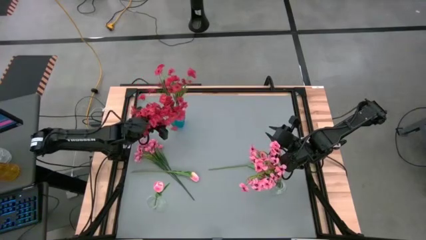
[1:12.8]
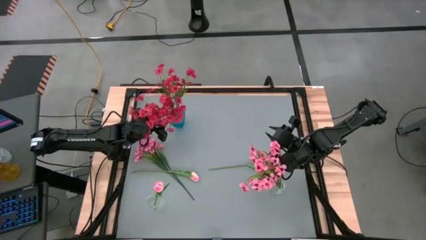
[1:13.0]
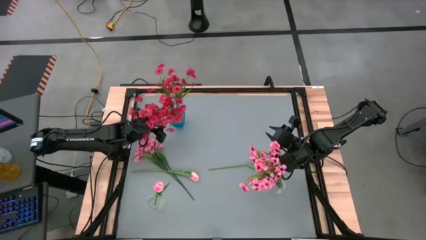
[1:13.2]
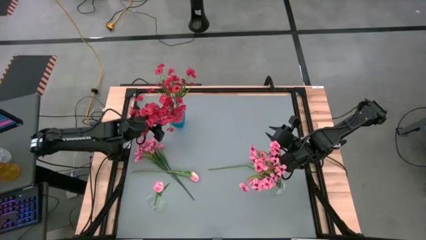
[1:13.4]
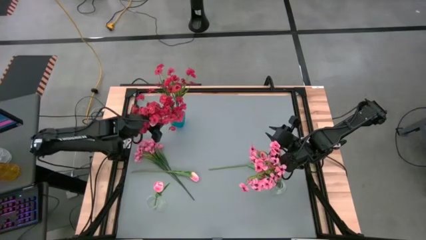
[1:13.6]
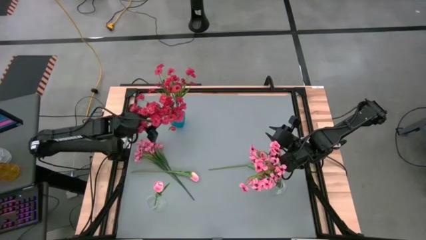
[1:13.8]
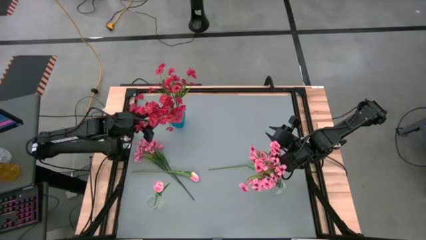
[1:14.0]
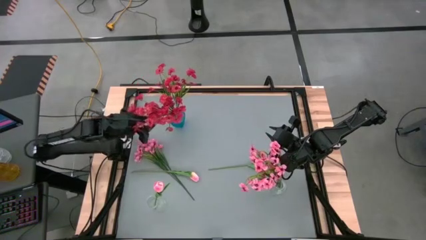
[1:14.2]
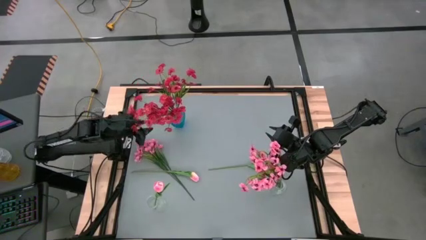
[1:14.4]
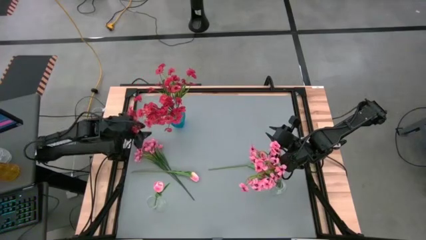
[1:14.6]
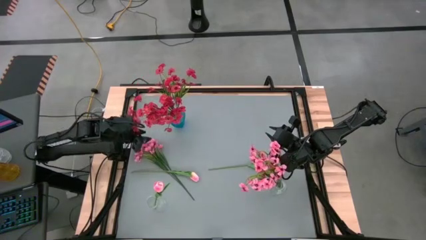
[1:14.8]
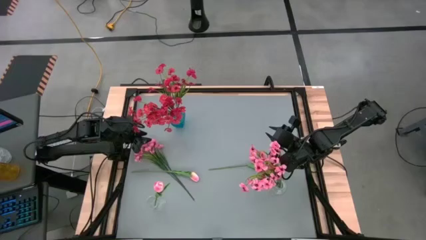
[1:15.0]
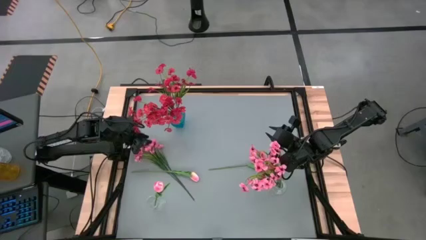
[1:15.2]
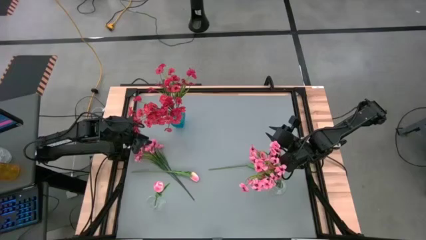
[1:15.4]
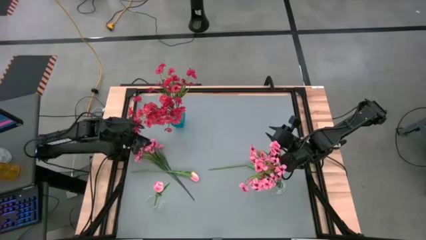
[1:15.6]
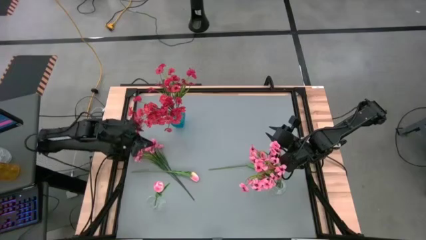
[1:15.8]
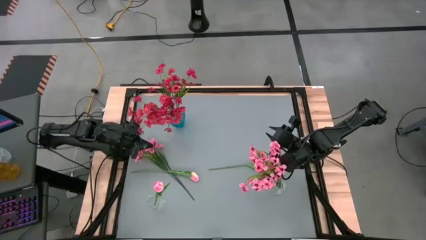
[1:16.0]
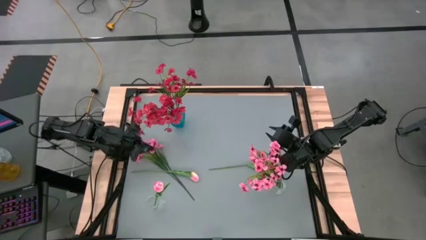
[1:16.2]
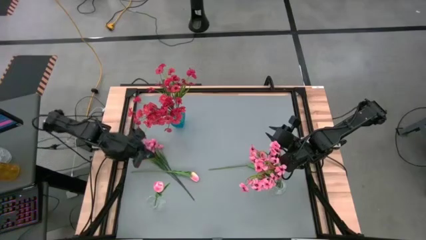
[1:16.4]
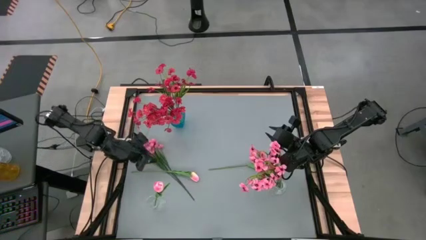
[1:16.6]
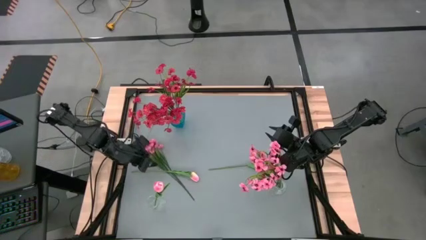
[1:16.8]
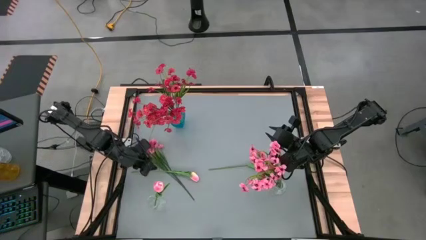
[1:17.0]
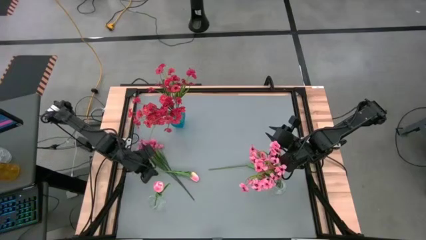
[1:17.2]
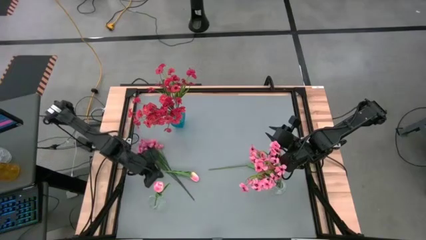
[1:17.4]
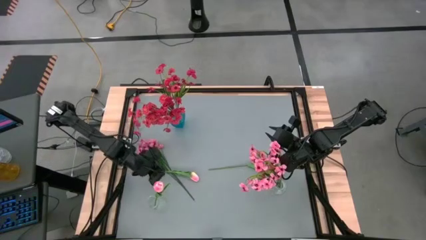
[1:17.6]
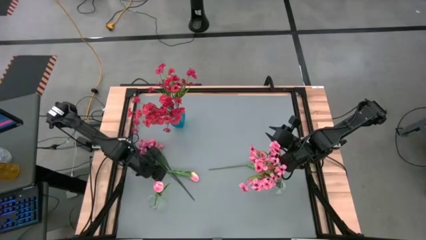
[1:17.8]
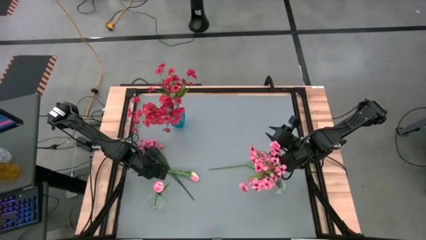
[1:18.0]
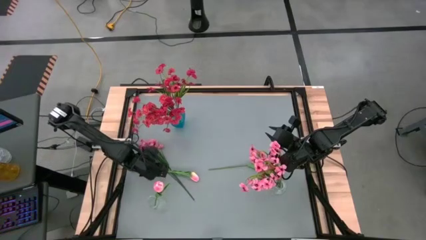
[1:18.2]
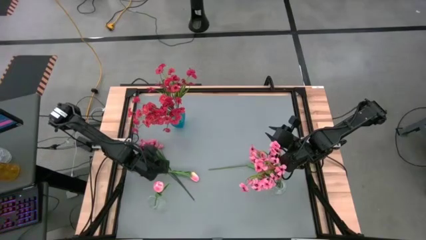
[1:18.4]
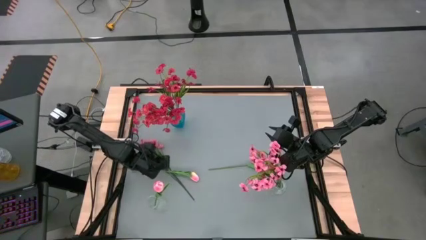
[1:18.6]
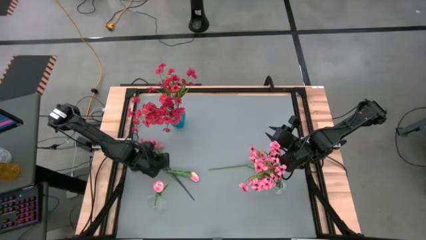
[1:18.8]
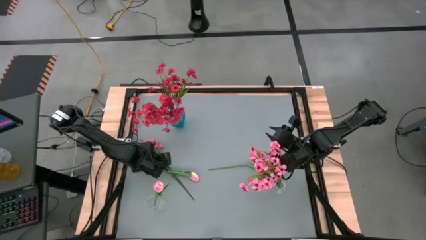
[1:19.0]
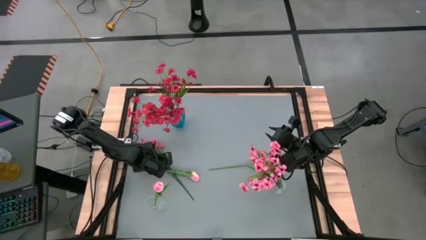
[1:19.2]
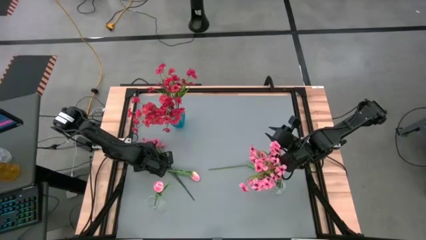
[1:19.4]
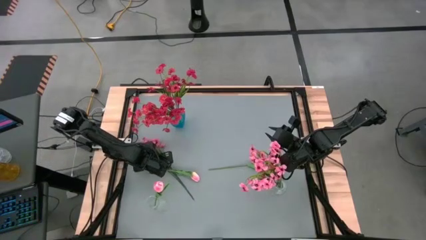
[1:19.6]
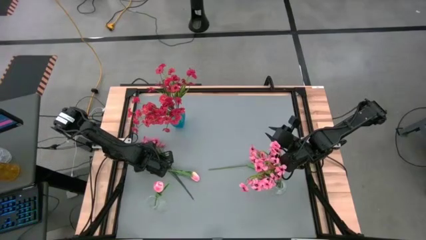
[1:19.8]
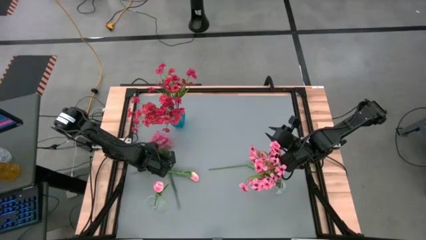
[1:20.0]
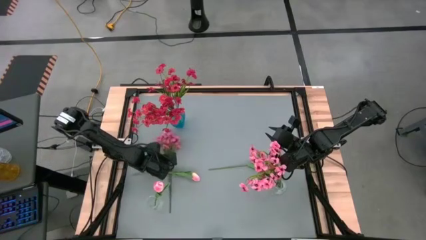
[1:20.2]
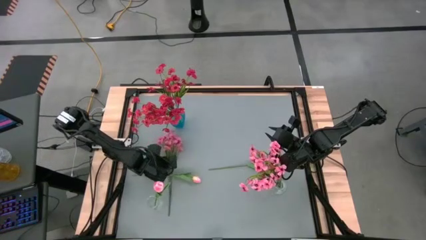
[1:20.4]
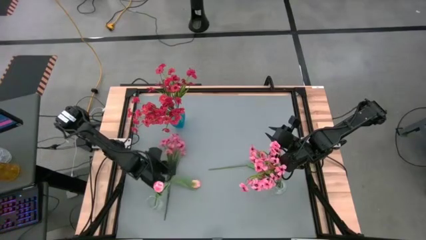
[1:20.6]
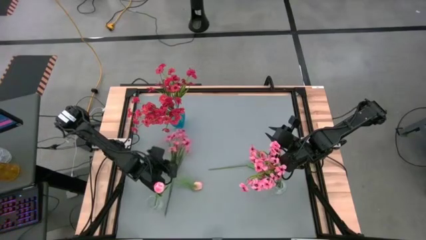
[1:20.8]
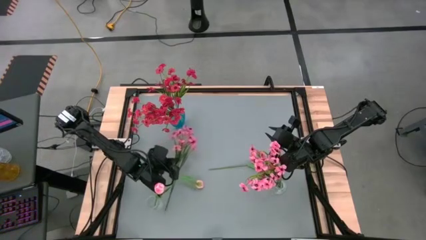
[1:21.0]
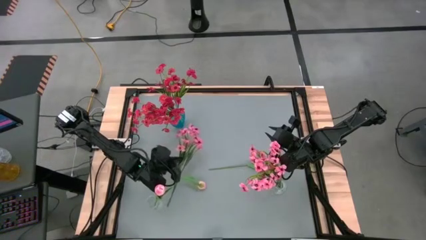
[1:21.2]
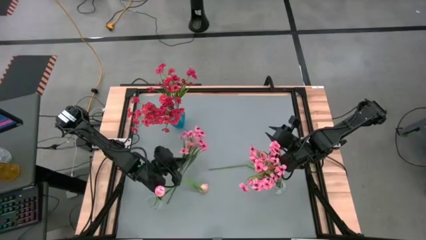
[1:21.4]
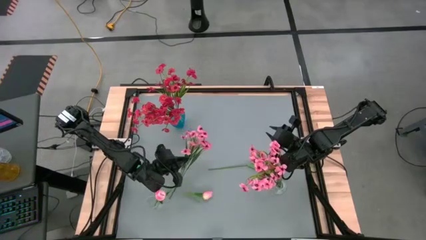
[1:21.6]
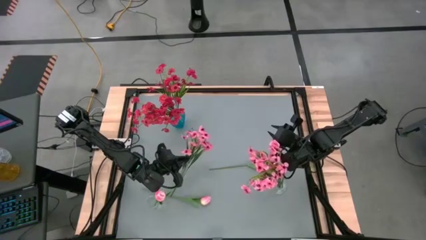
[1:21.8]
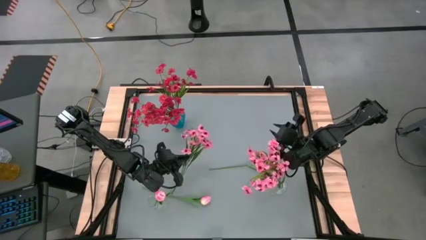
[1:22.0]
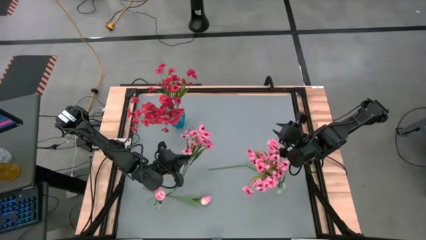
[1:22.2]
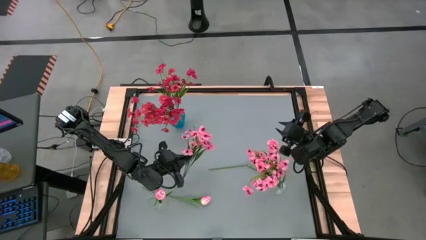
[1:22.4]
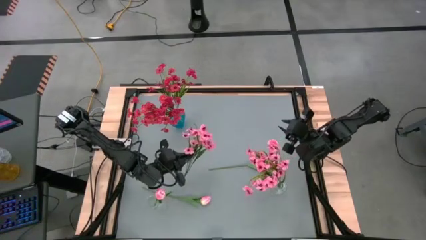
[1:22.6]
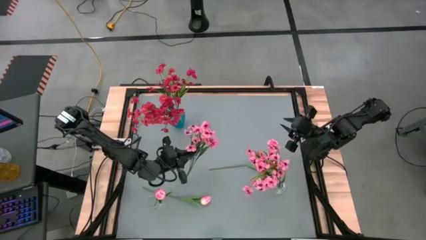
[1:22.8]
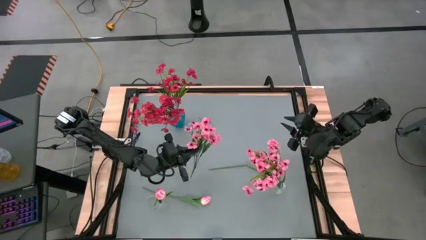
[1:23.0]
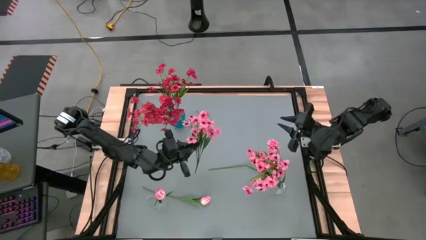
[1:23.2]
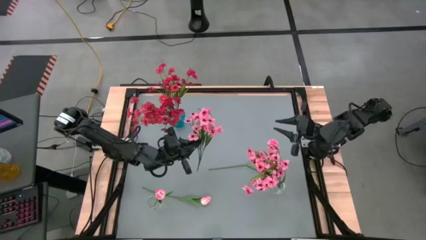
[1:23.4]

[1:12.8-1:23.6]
Task: Sort flowers into vase by color
Put the pink flowers into the transparent vase

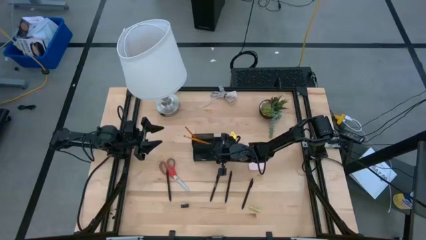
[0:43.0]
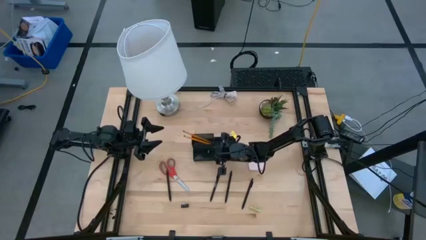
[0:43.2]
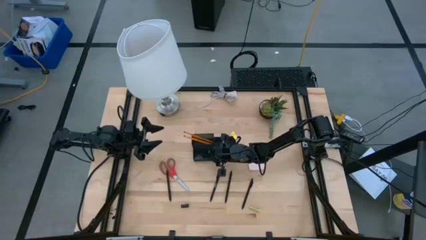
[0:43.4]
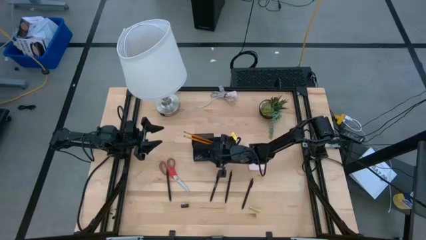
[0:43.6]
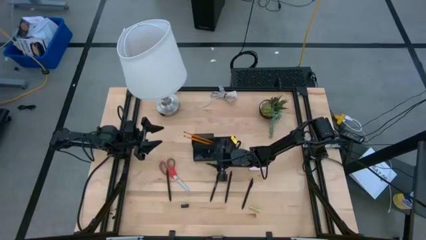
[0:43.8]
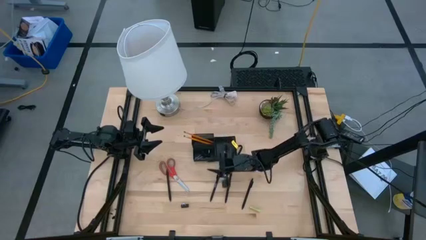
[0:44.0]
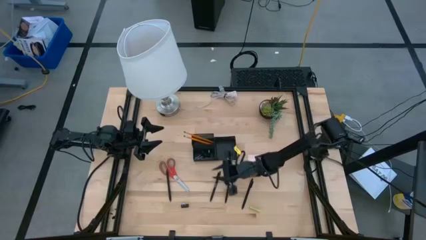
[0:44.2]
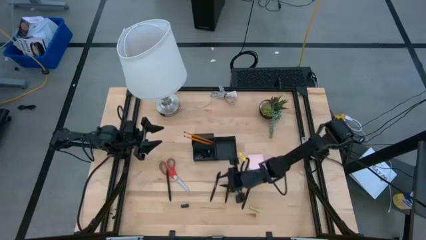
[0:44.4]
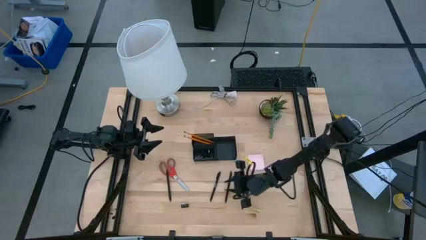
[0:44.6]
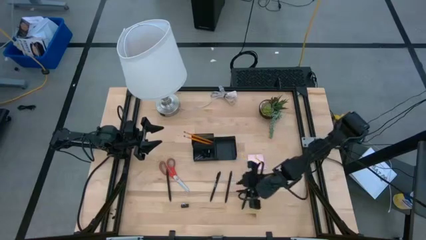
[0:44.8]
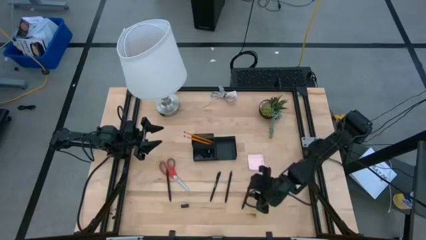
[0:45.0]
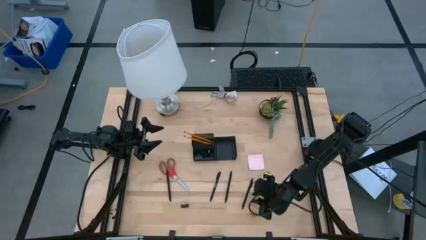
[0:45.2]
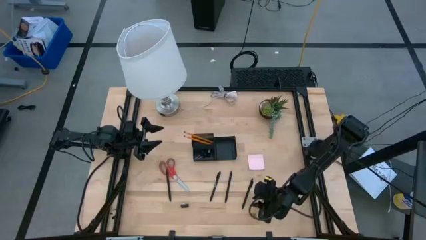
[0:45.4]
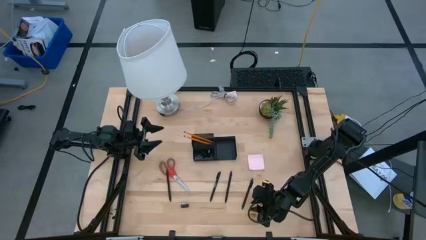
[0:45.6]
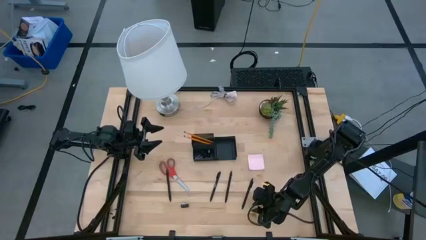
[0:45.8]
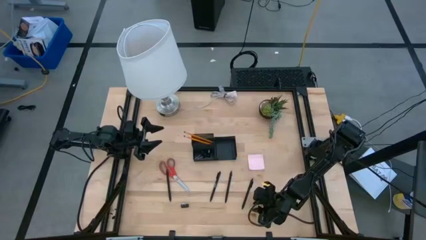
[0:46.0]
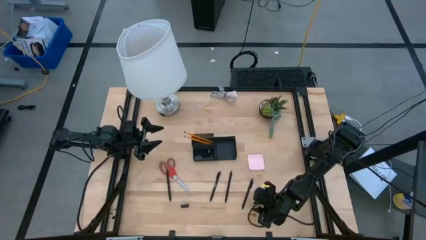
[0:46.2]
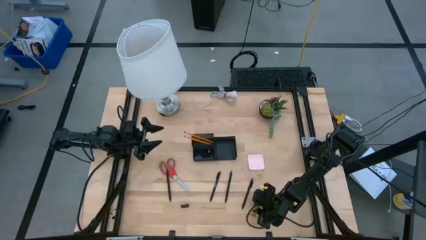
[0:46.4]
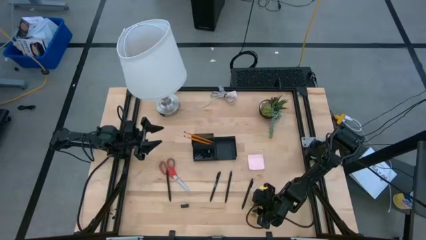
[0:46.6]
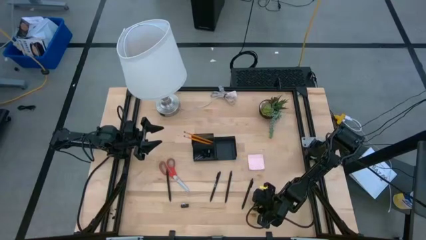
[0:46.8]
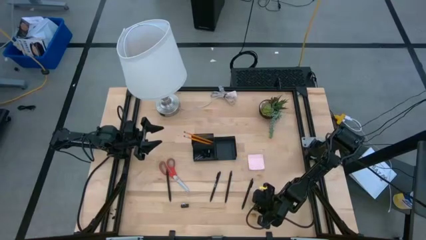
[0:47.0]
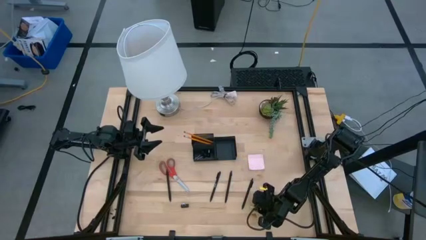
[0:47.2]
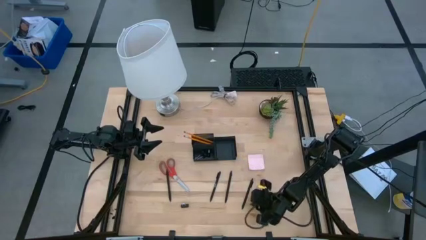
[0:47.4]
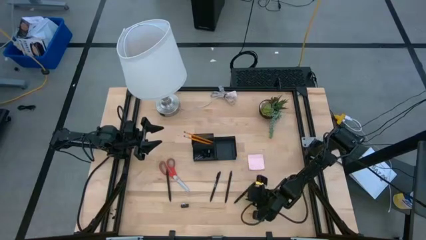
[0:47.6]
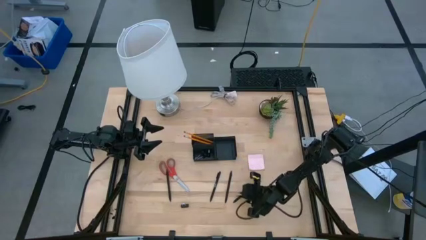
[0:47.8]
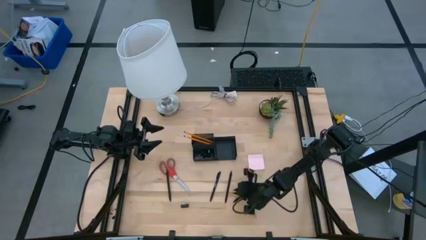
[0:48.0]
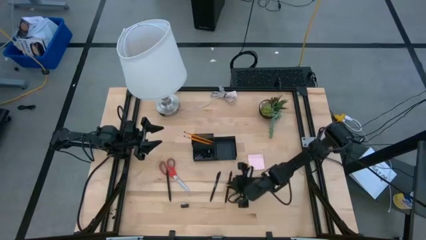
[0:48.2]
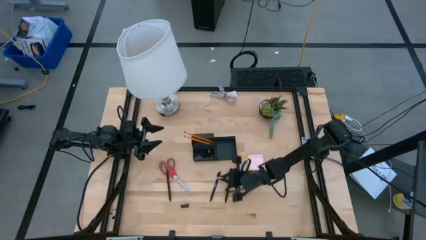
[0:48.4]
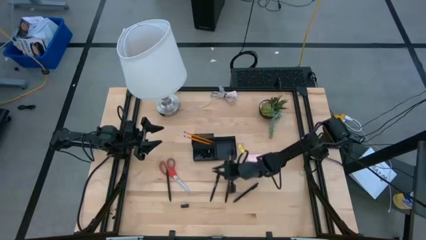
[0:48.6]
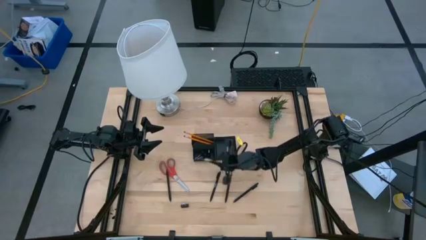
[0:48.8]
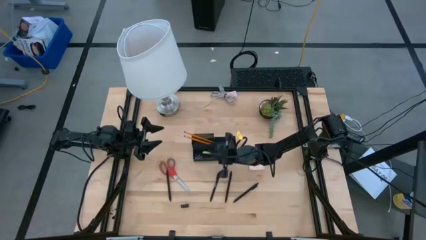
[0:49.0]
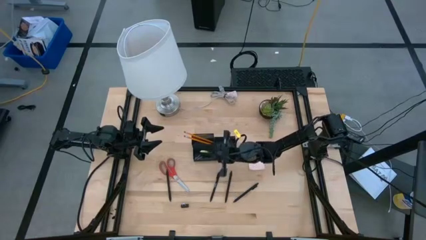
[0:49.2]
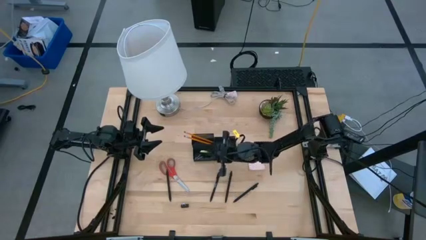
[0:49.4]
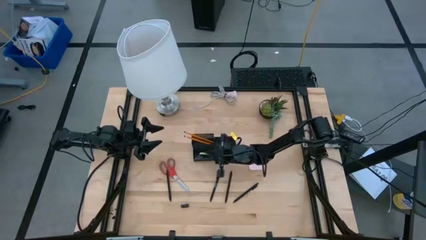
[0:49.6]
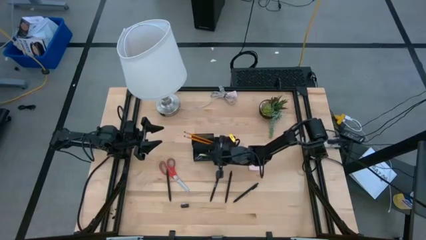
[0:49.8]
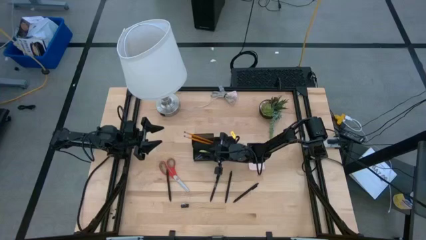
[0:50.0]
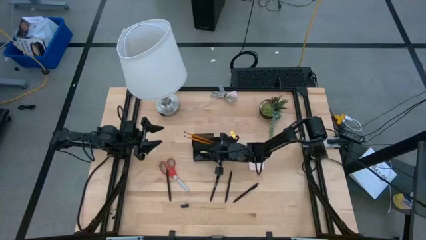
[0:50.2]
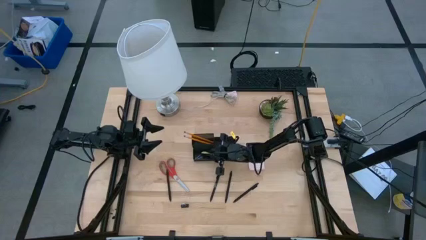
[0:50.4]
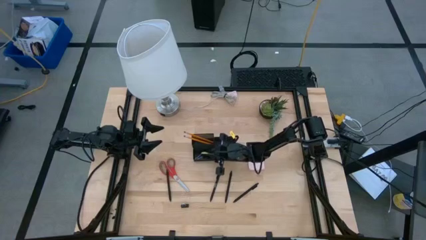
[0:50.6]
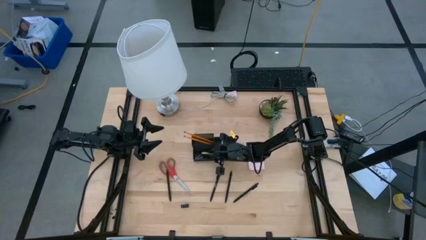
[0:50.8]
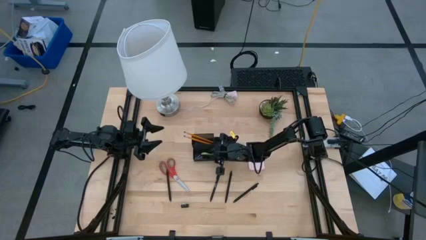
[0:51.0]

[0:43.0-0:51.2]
Task: Pick and place office supplies into organizer
Put the green eraser into the black desk organizer
